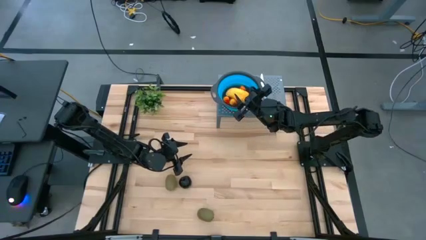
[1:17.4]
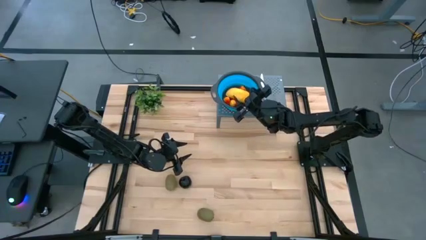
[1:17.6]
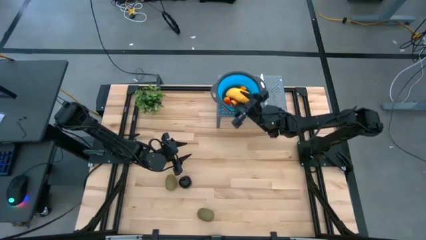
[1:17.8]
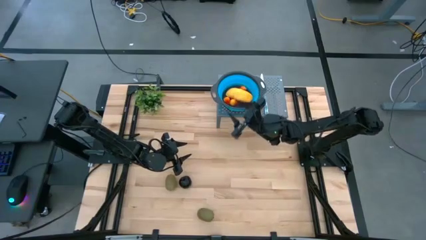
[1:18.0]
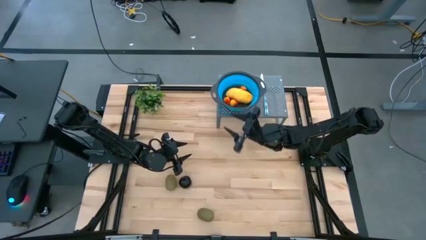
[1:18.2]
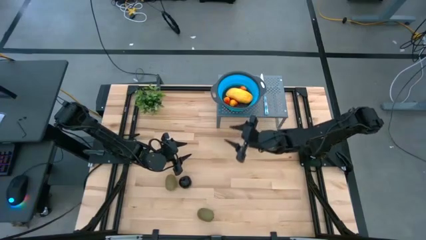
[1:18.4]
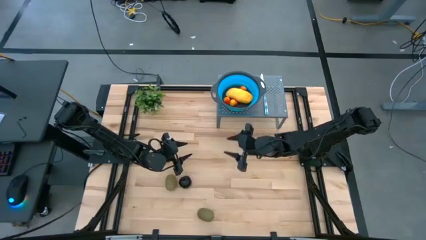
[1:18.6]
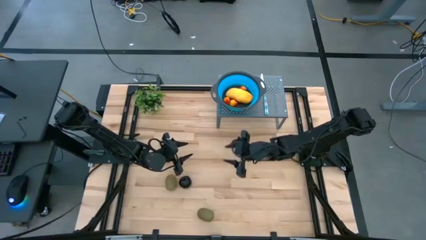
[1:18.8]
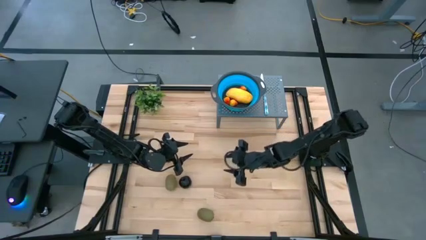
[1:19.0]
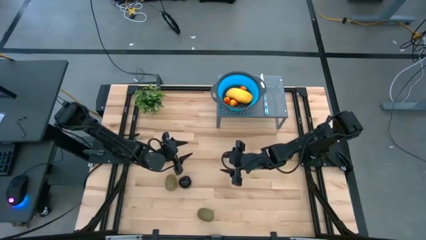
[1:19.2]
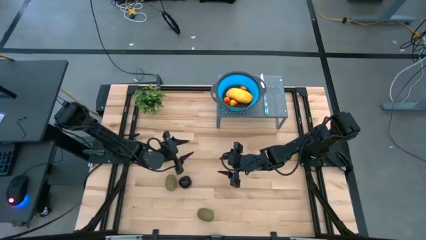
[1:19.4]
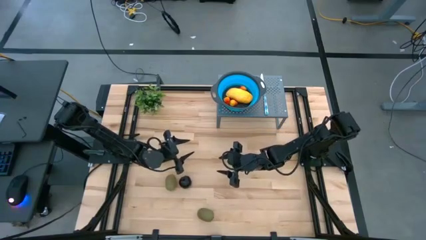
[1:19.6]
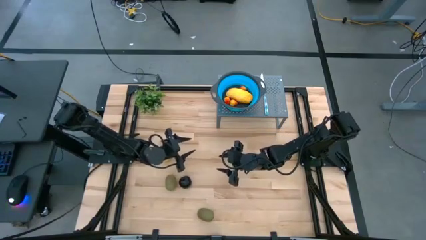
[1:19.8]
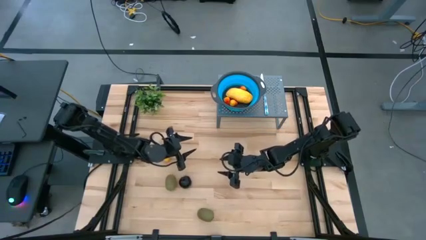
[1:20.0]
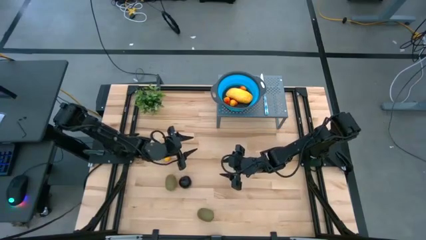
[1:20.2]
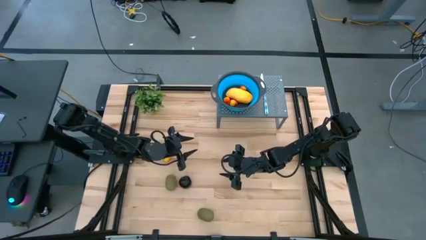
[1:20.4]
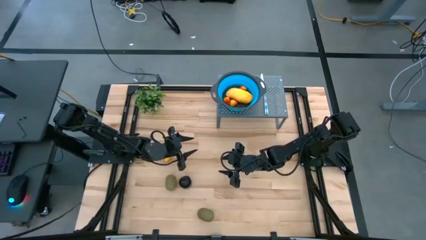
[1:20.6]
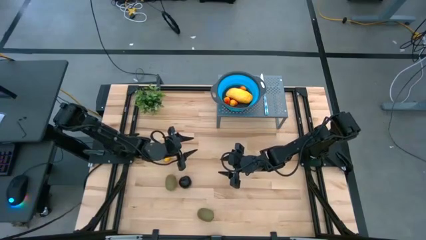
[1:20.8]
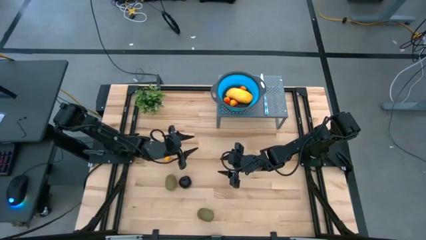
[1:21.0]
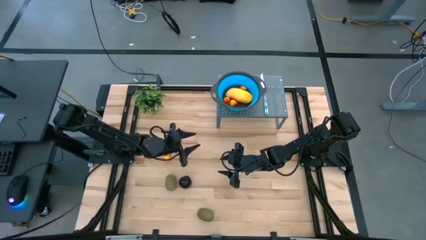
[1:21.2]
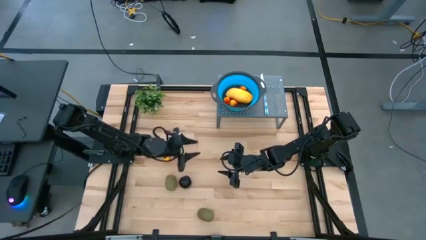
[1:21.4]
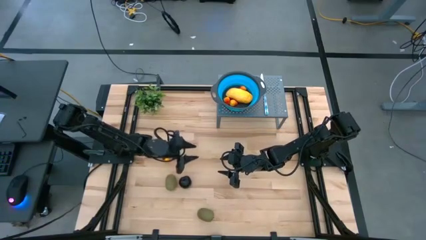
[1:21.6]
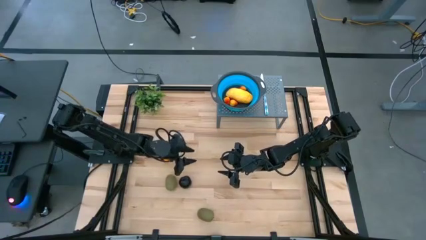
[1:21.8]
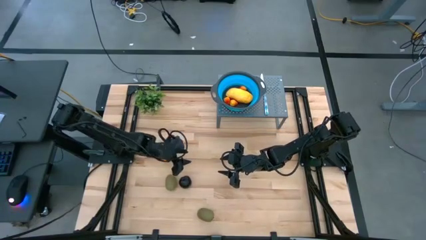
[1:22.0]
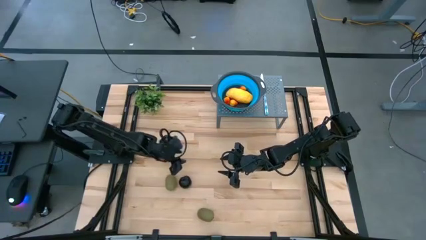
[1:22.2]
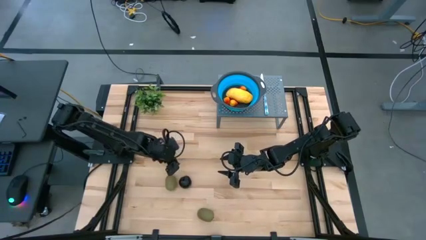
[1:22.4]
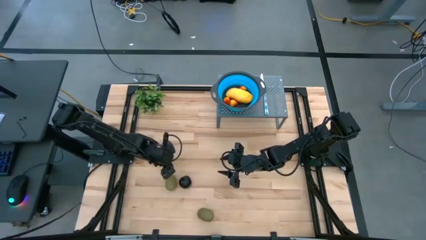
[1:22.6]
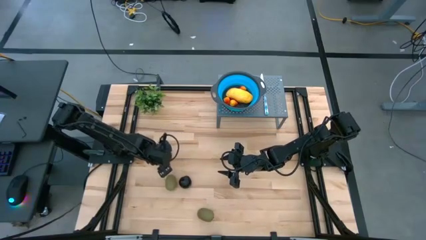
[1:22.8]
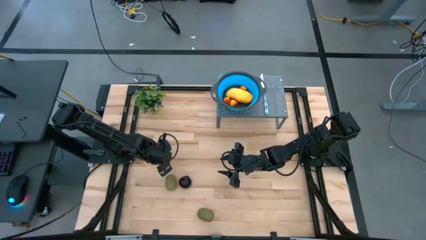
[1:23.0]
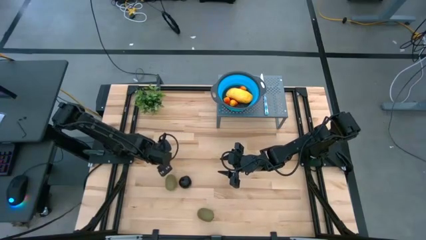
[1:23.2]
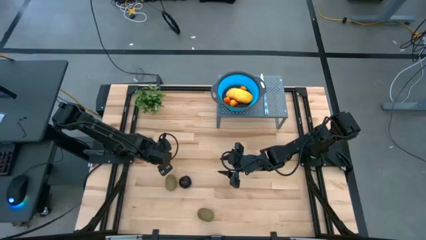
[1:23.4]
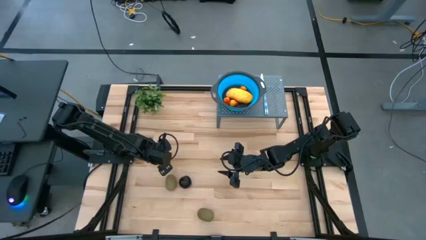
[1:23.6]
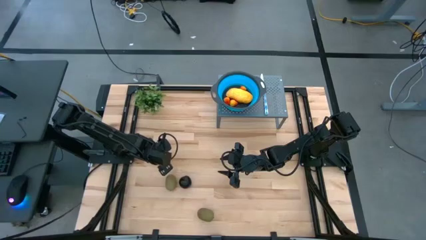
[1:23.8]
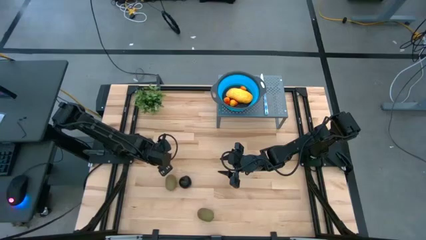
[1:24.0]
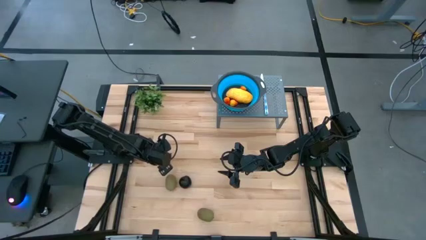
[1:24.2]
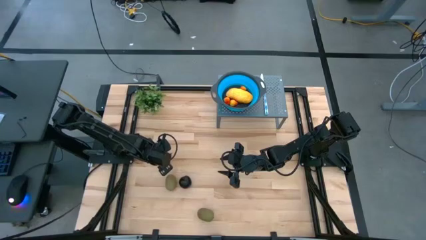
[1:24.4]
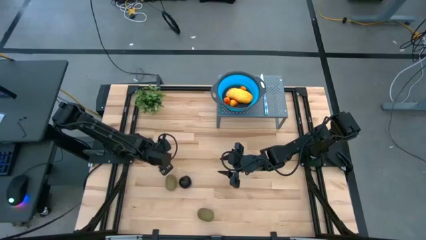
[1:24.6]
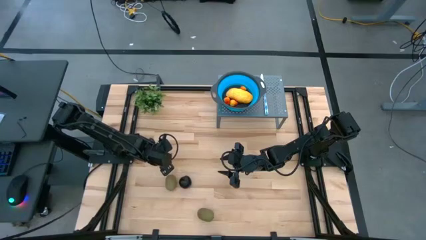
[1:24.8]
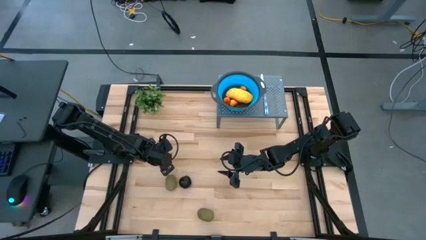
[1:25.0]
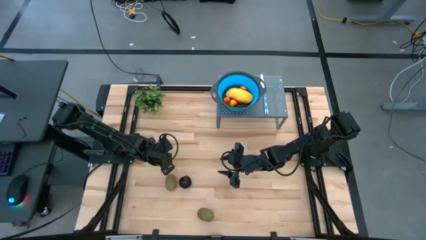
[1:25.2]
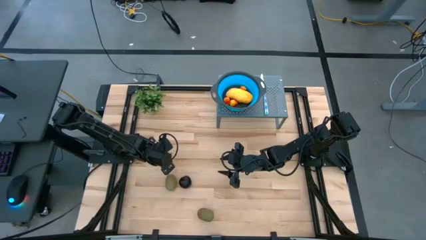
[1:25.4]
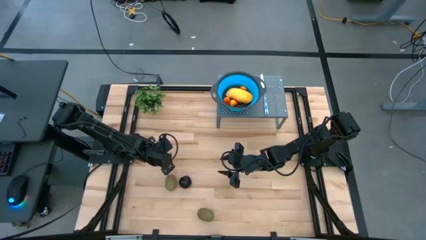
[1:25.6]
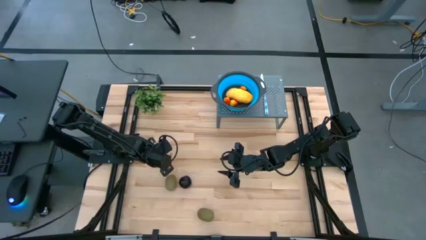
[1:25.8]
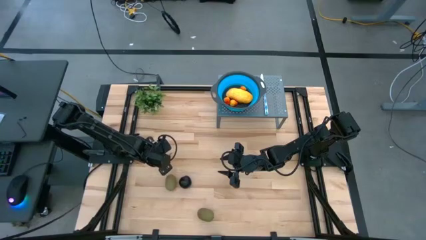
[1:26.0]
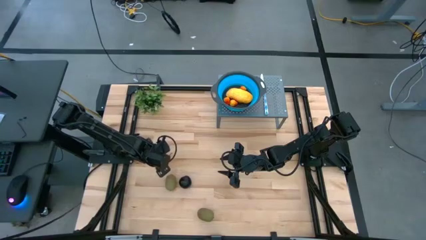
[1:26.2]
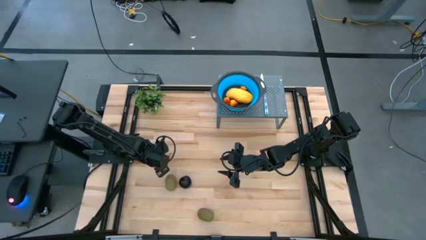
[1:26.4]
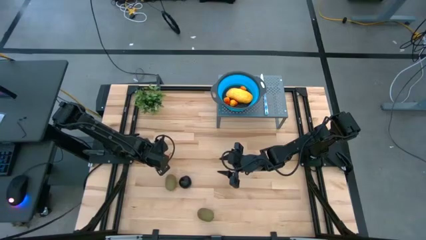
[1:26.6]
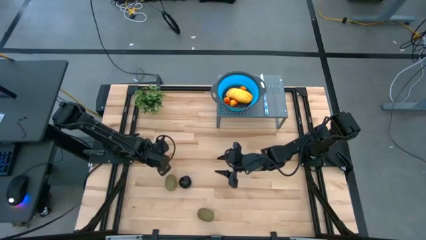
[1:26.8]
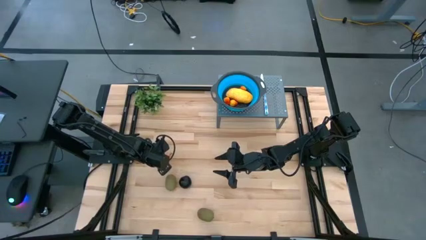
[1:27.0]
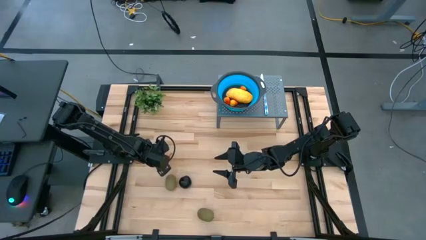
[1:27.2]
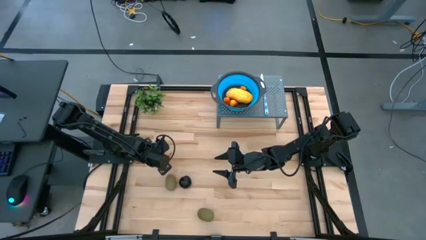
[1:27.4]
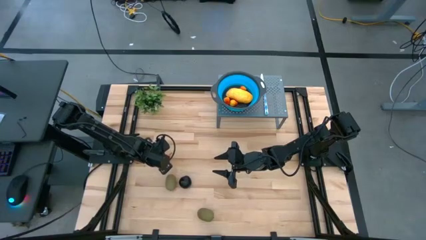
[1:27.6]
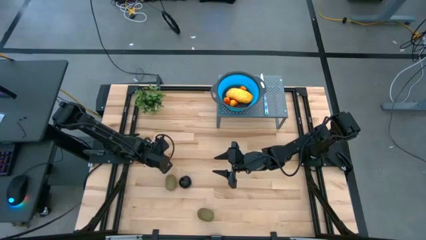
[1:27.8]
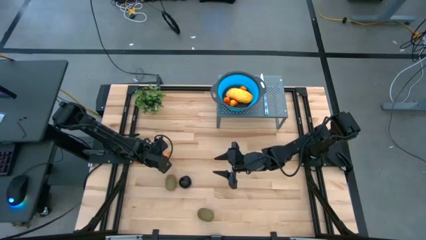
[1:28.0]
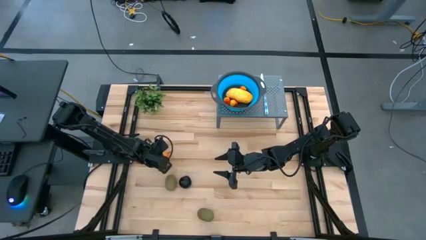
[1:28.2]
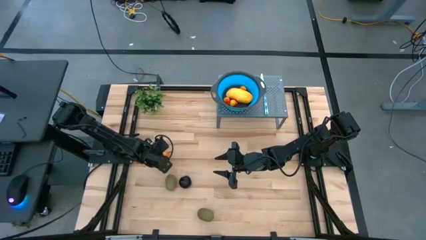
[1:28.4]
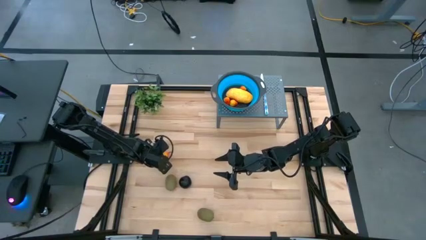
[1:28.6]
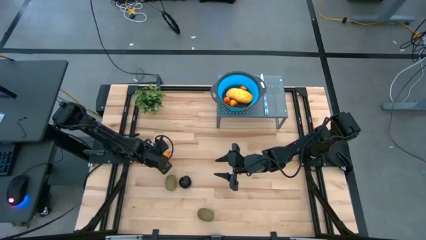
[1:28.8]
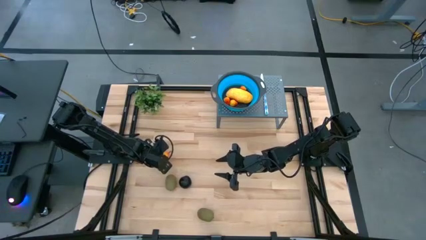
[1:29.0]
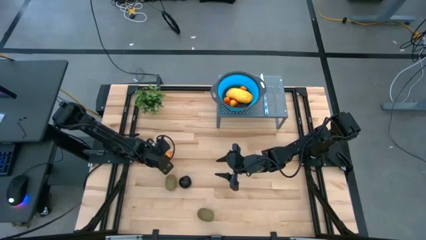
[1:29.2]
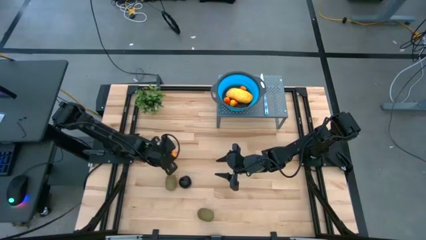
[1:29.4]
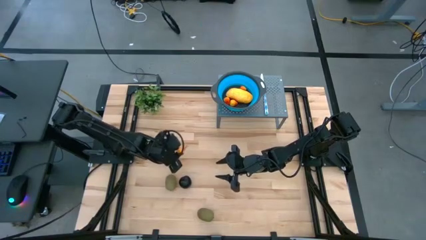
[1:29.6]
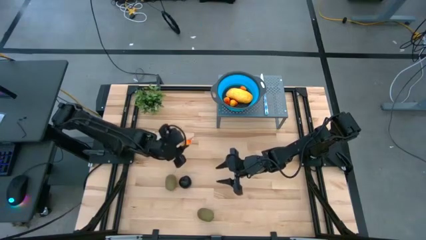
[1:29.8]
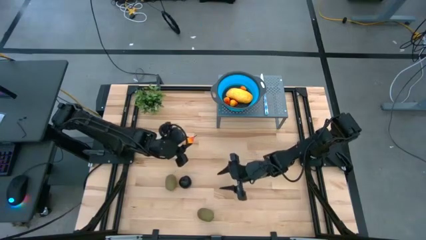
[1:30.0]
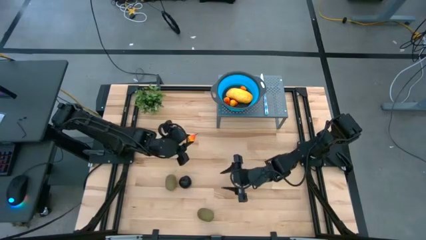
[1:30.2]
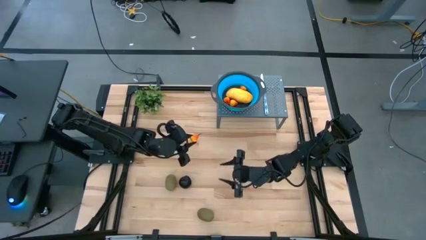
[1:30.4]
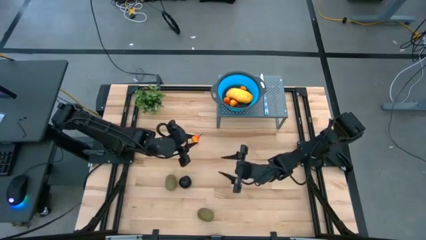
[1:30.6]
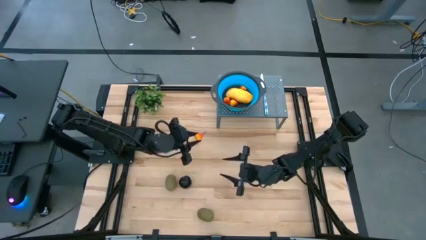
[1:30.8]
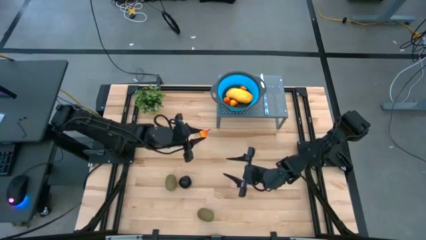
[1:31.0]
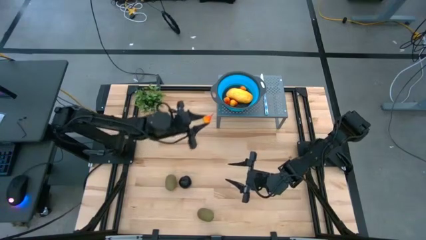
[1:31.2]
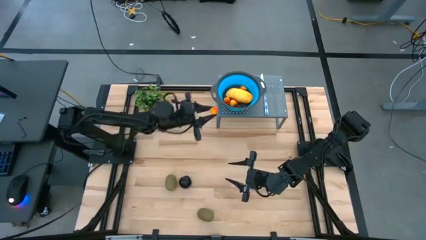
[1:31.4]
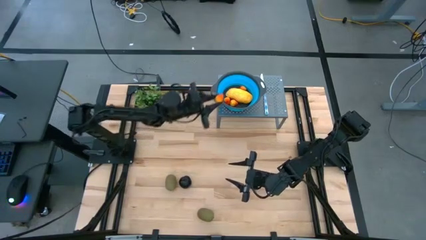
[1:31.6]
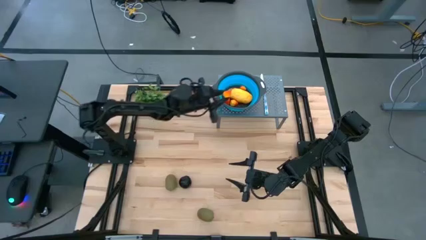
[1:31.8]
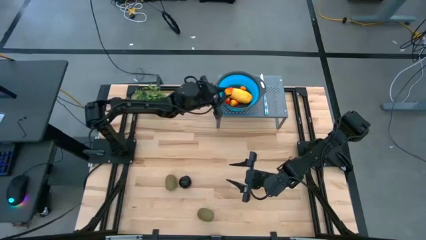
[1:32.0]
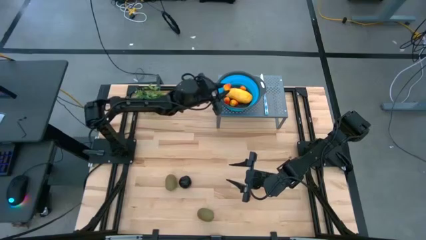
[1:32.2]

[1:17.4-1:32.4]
Task: Pick & Place Fruit
Put the yellow peach into the blue strainer bowl
